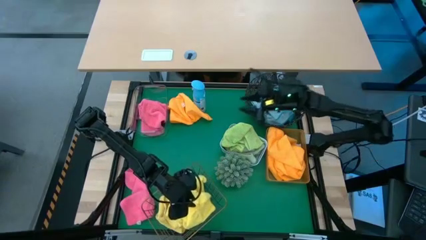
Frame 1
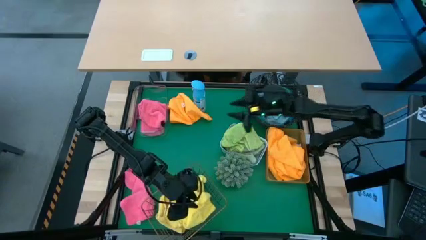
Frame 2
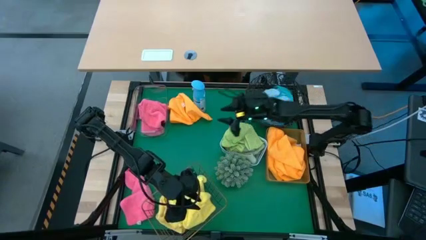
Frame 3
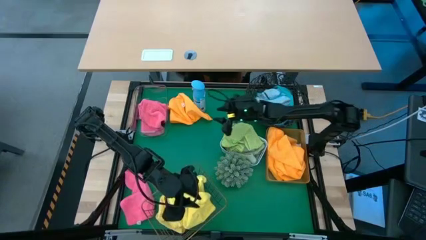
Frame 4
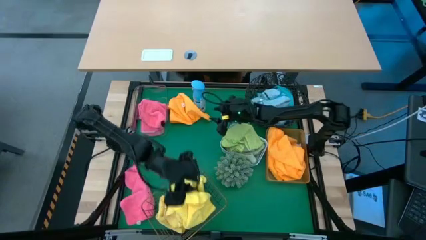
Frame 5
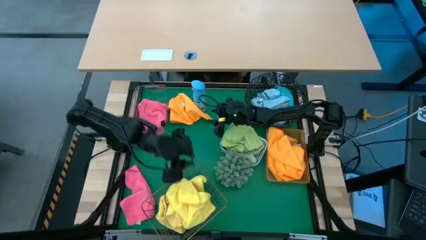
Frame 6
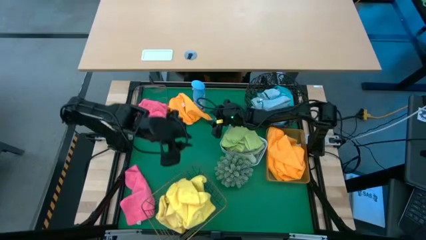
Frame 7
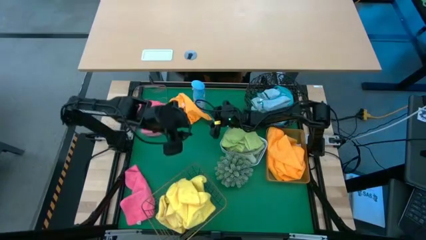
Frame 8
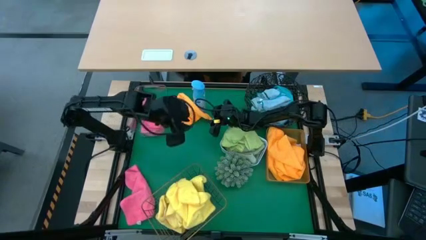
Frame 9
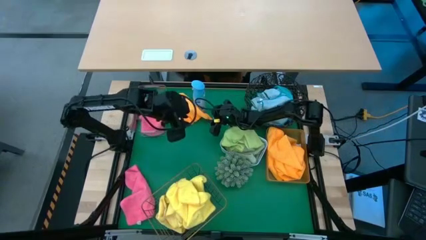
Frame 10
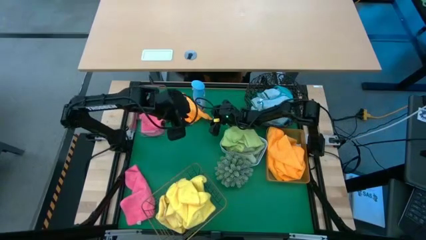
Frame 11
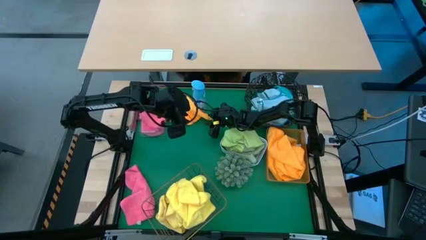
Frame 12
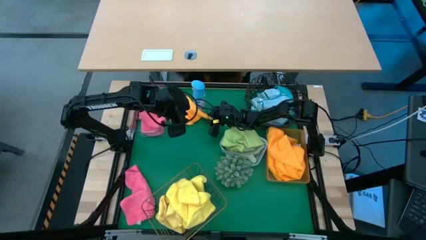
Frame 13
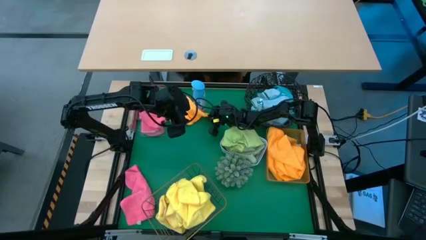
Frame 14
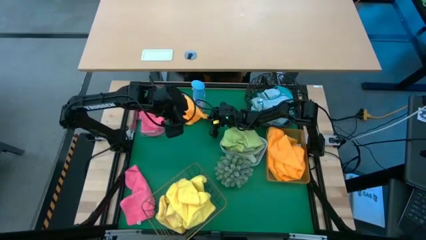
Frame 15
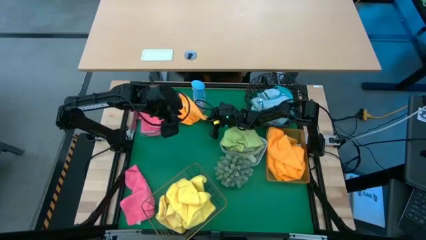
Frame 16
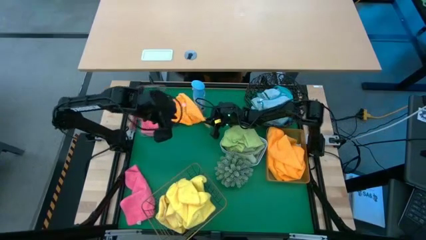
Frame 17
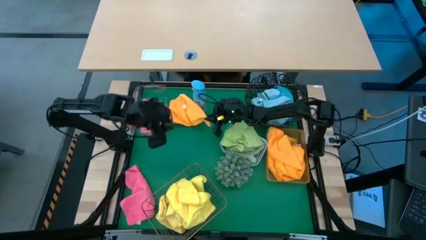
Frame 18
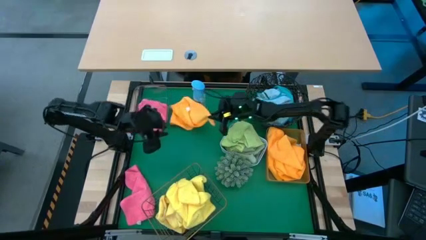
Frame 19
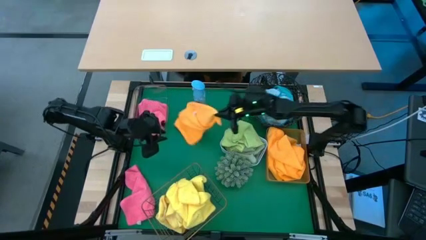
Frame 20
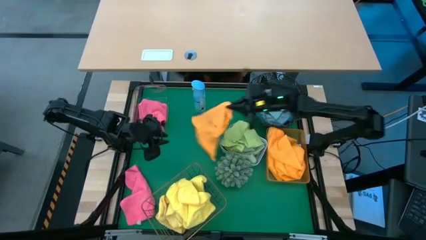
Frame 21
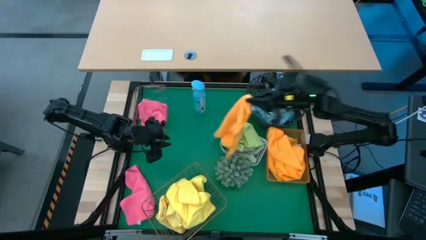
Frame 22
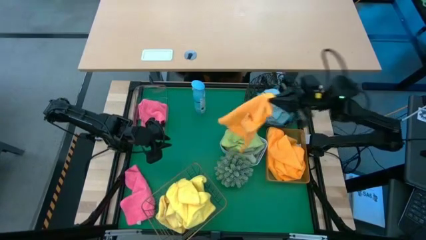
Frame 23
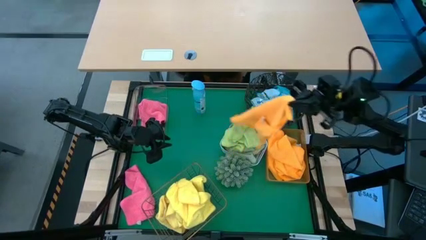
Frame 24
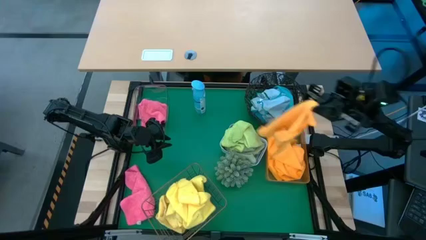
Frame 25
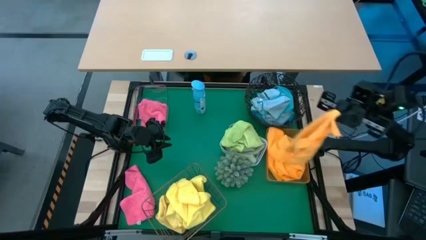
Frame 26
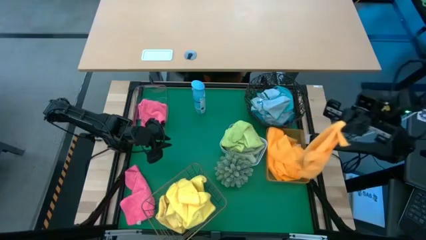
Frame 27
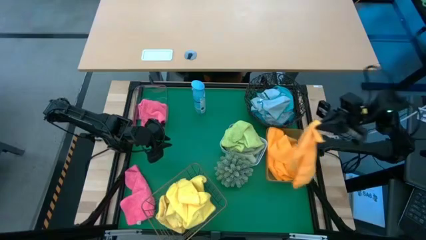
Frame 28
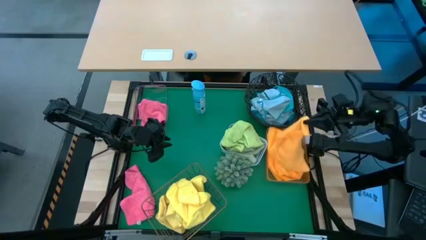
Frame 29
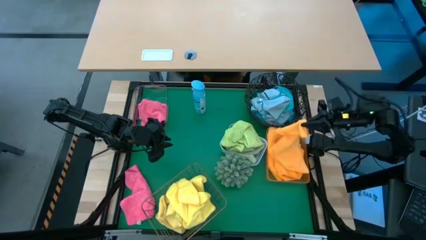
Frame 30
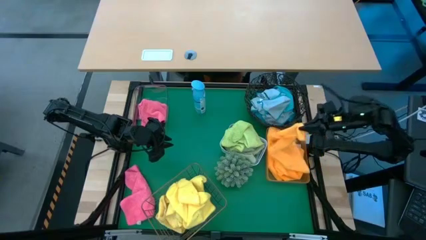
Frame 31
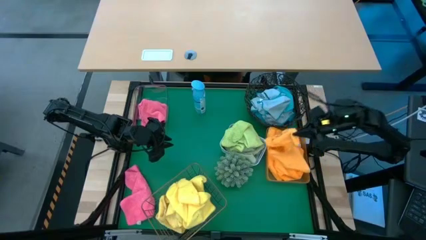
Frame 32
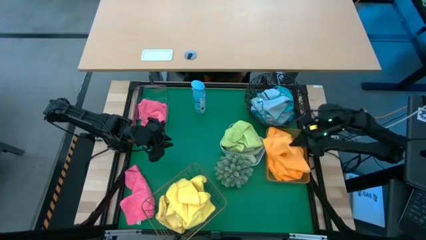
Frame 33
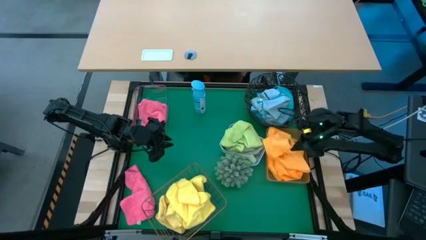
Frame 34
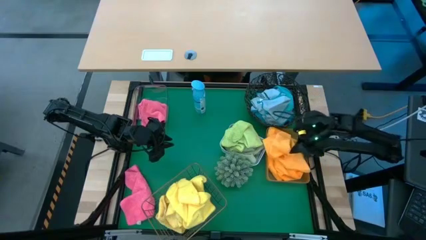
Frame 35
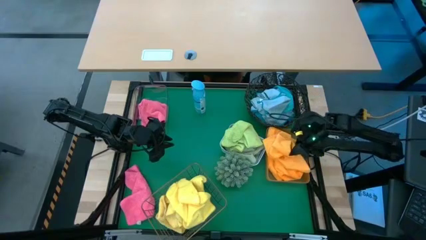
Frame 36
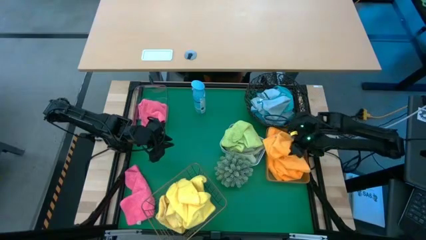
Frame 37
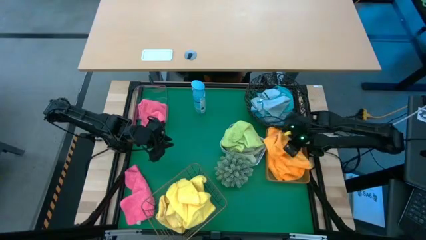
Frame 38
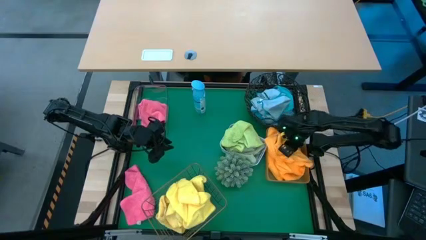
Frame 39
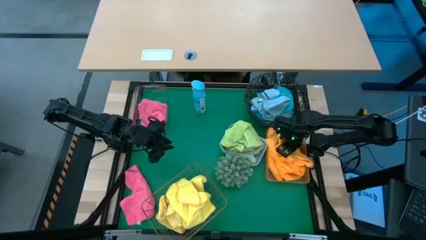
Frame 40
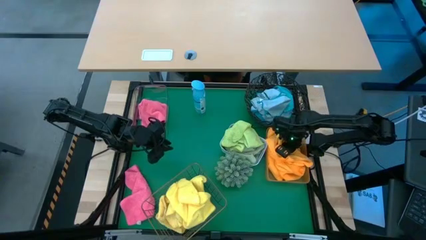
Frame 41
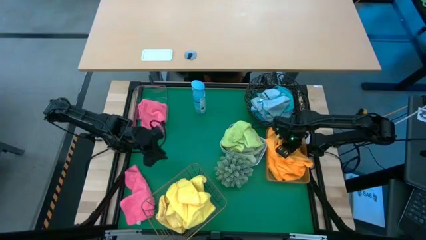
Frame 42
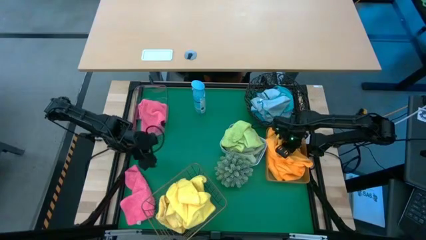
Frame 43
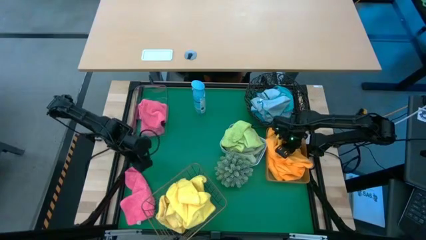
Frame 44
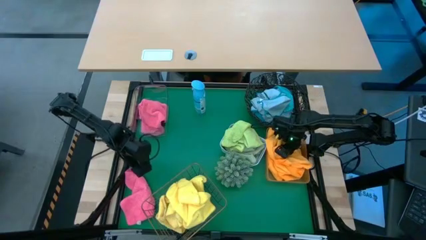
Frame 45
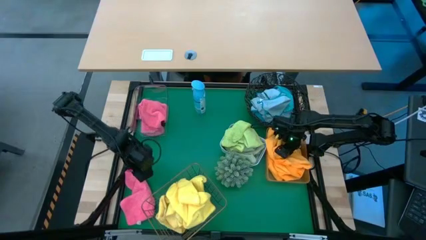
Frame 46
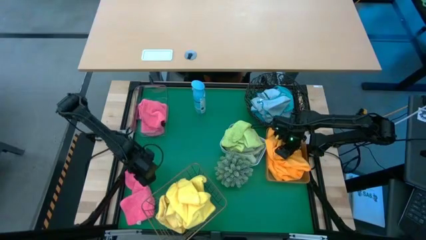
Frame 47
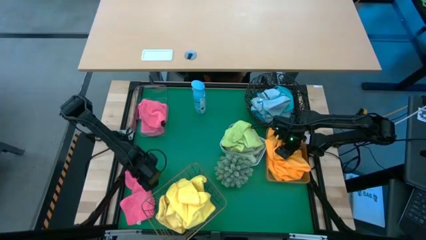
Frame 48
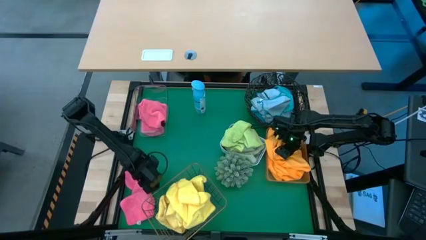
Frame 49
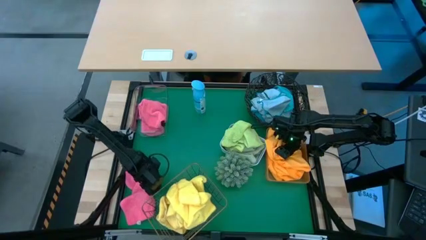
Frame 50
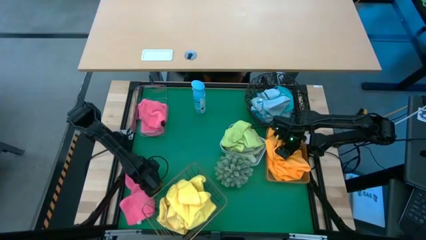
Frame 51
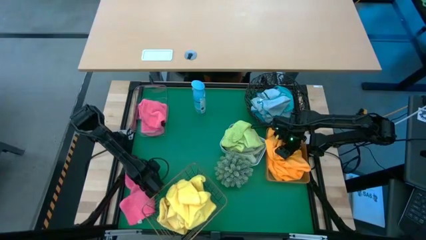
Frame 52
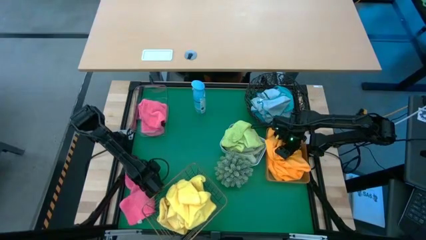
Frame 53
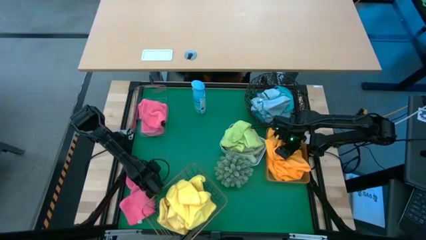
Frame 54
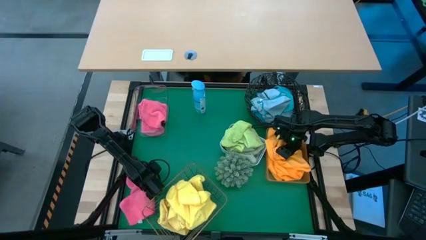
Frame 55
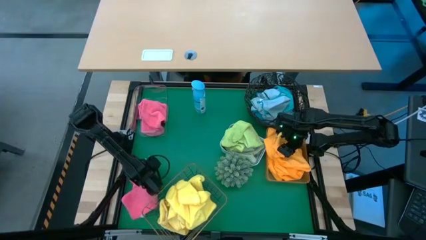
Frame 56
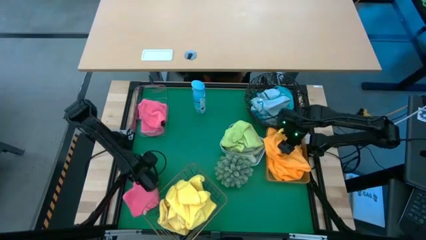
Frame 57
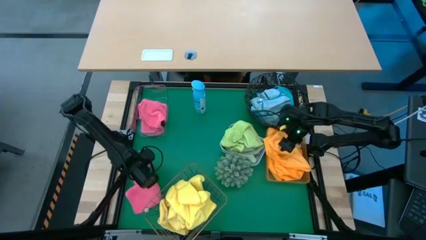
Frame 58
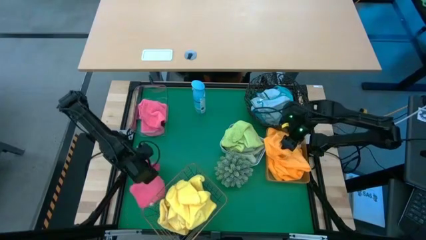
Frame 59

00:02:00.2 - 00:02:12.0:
Task: Sort microfiber towel by color & place in baskets
Put the orange microfiber cloth into the orange bin

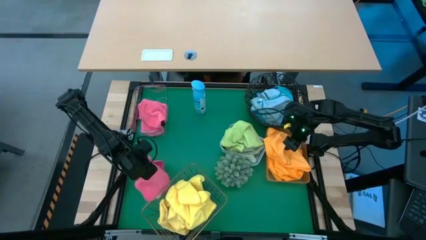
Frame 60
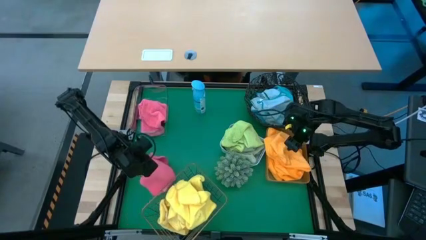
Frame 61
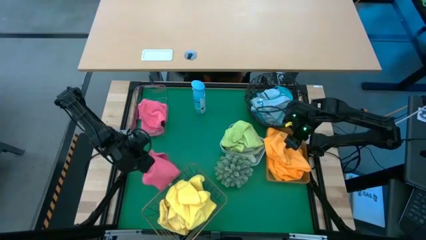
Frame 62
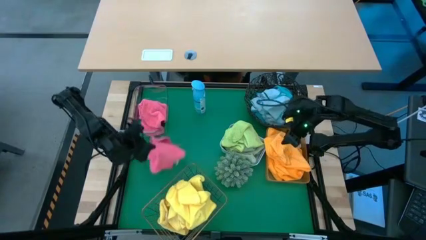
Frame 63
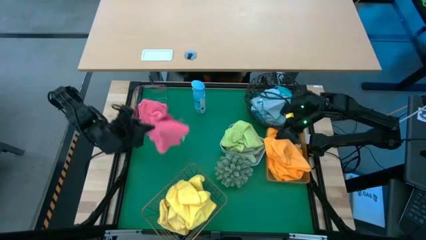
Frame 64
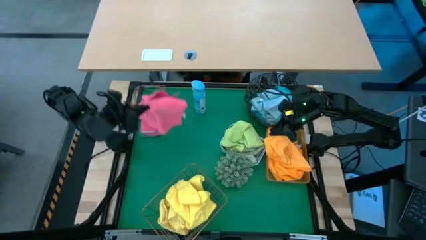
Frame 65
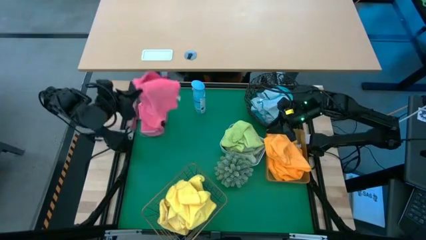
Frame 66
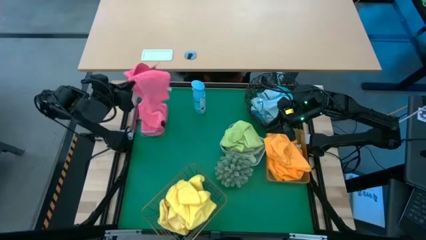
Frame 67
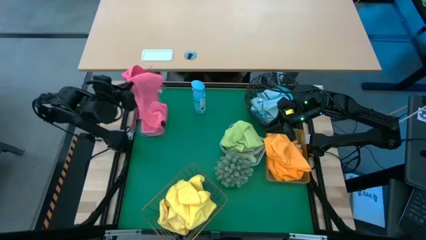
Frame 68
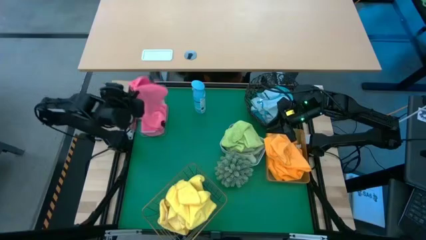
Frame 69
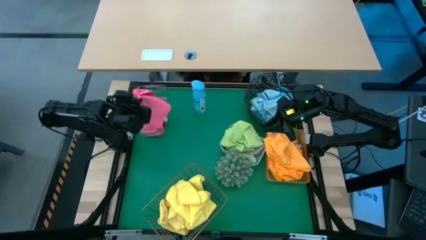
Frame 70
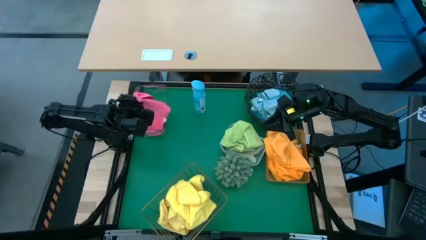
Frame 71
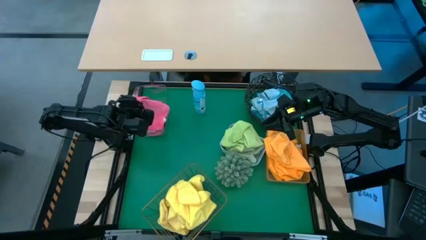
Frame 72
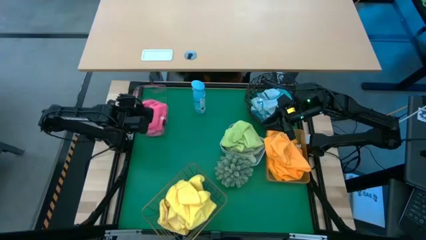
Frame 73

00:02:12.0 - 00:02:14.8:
Put the pink microfiber cloth into the transparent bin
